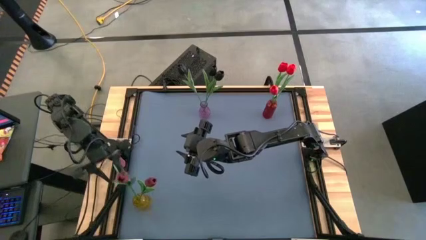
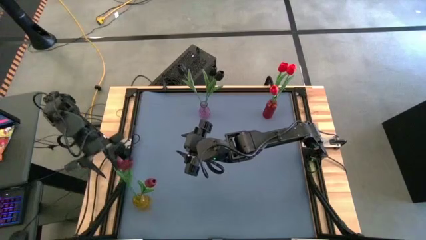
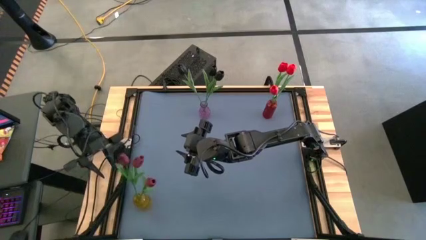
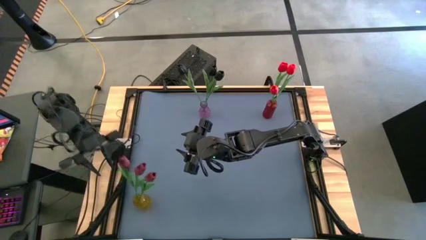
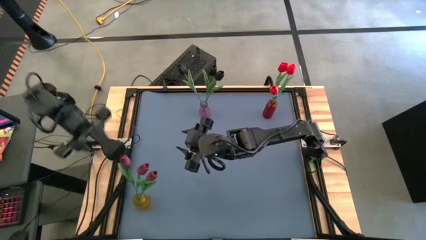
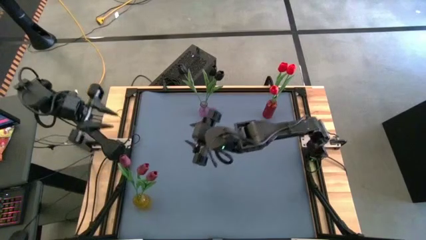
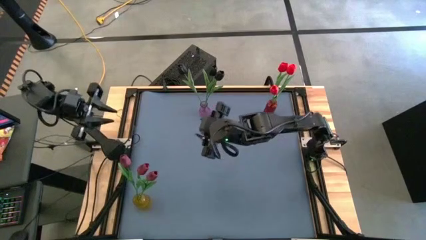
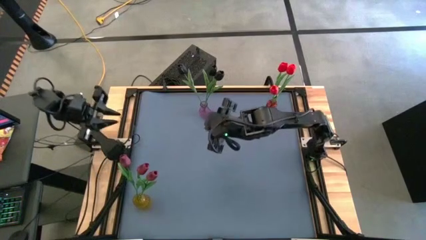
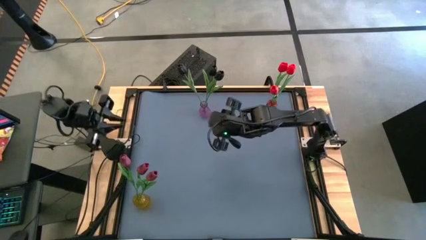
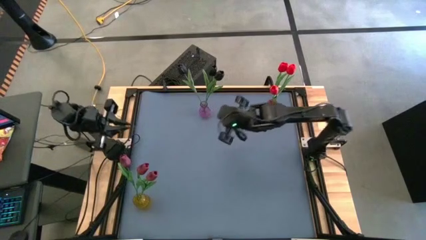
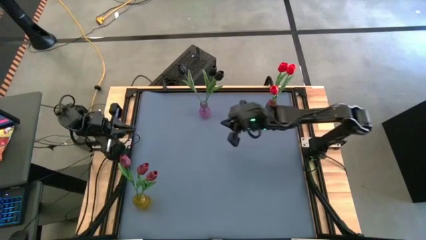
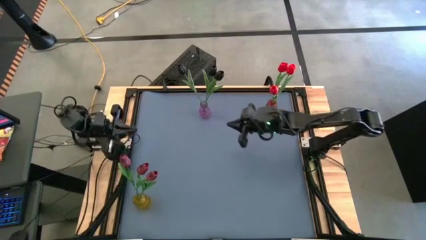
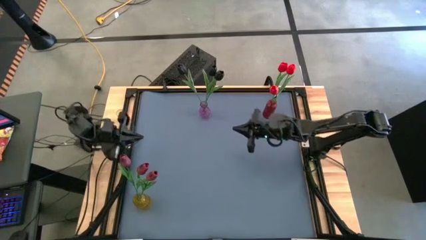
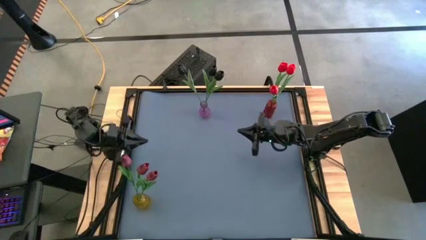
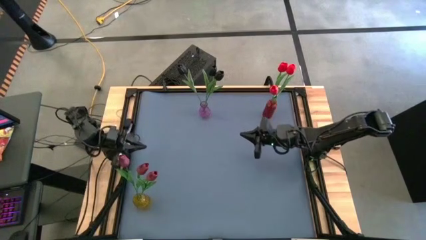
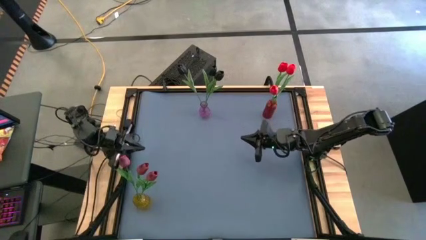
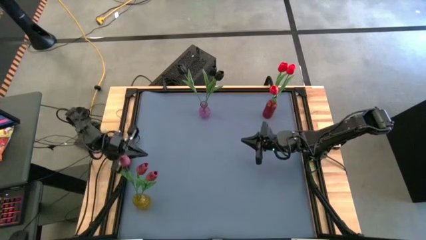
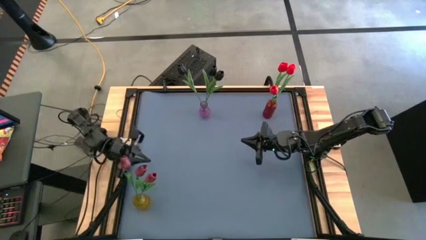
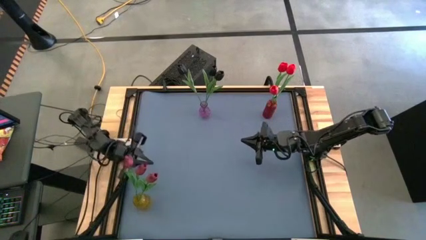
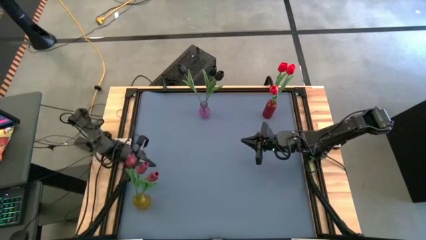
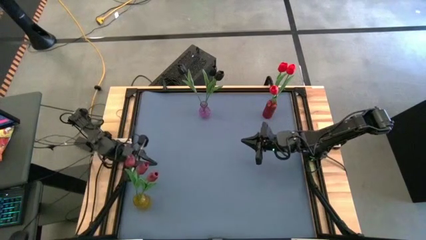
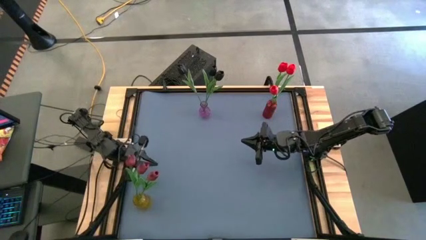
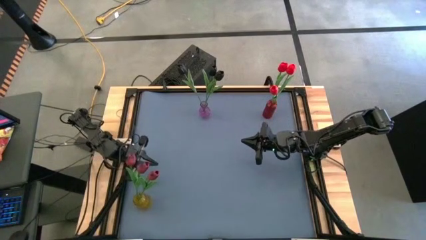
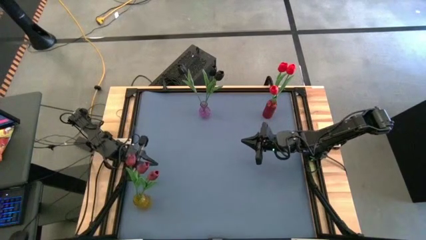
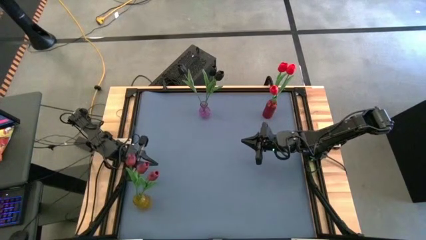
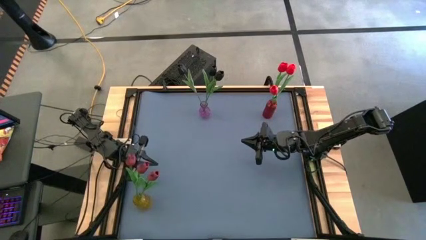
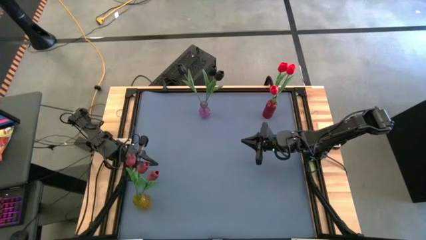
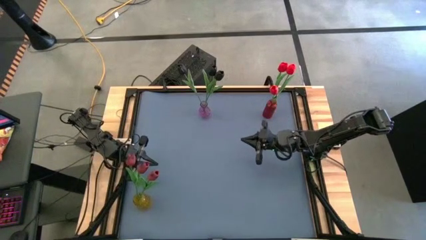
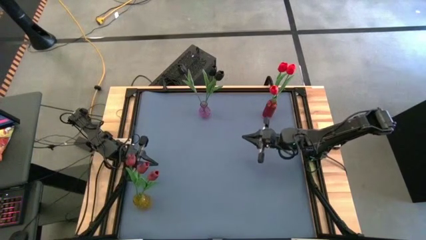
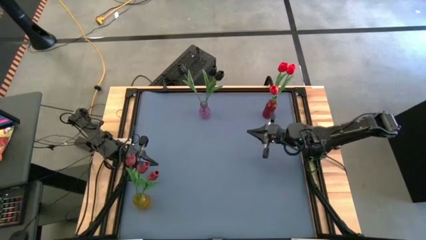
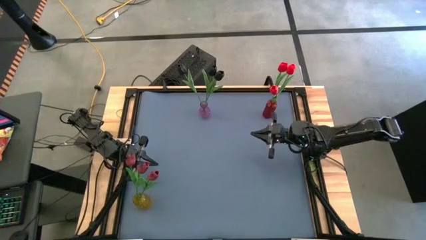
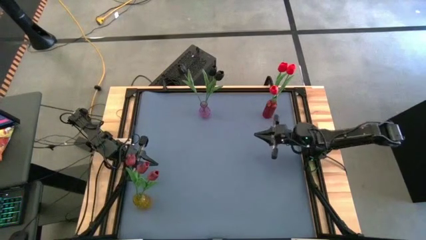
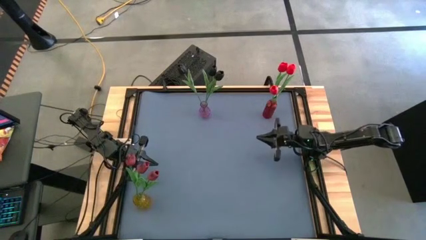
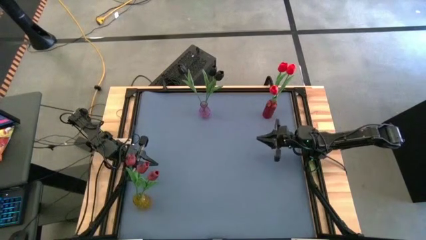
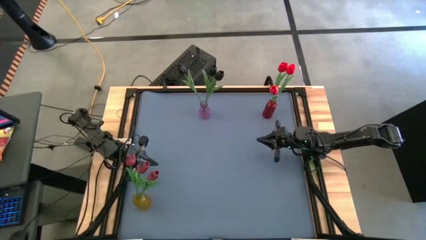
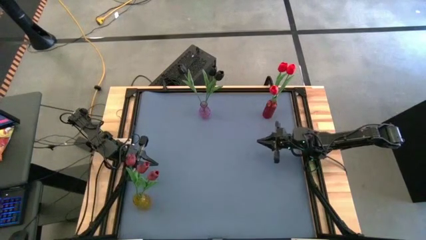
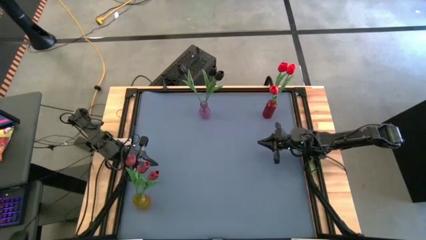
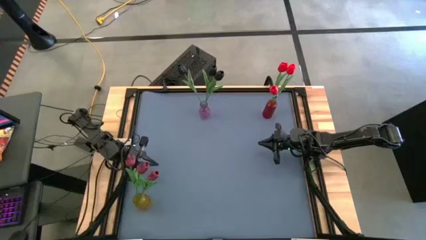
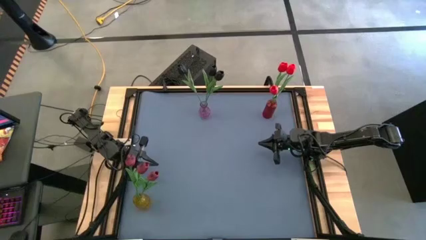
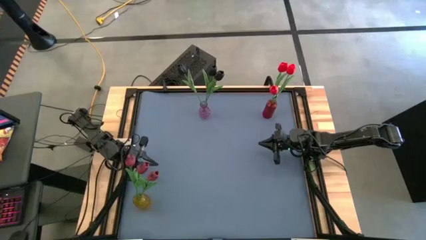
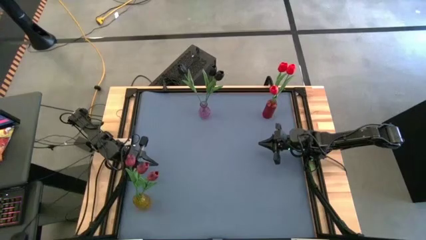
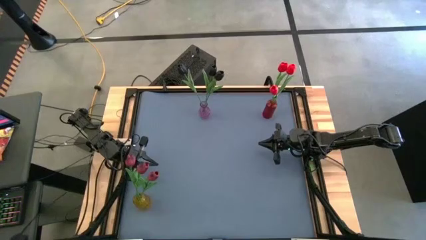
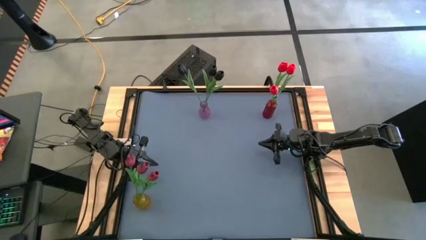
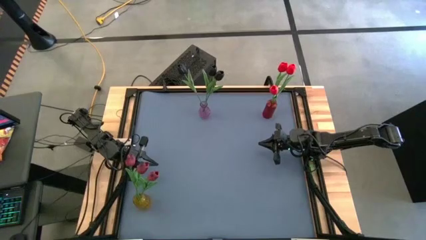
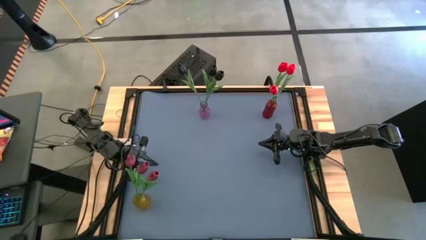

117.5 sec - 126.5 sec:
Task: Sort flowers into vase by color
Return to Home Position
